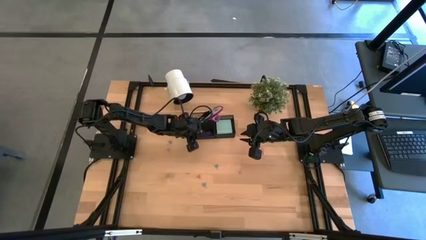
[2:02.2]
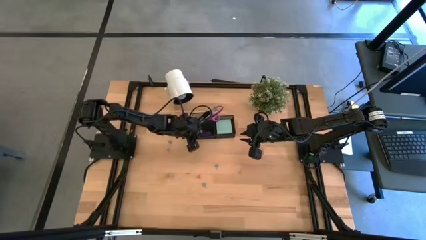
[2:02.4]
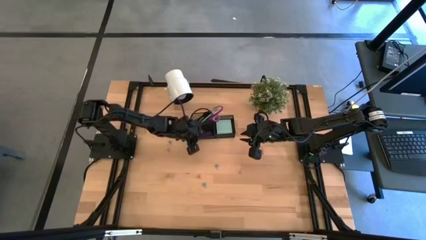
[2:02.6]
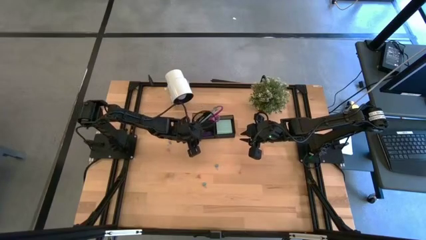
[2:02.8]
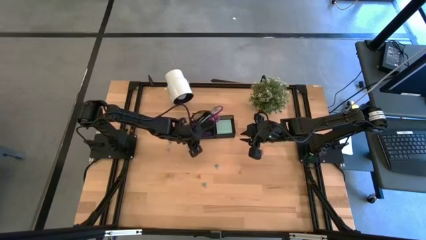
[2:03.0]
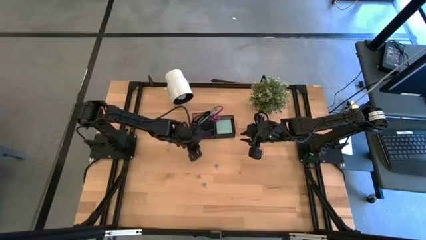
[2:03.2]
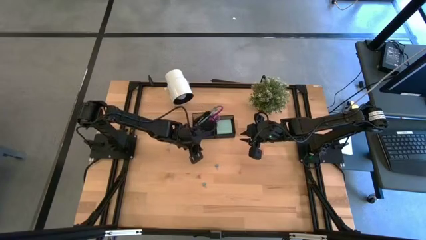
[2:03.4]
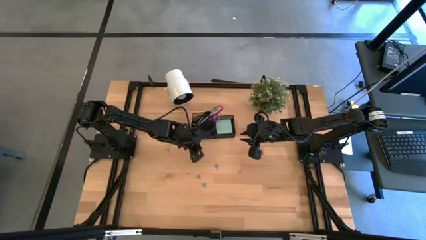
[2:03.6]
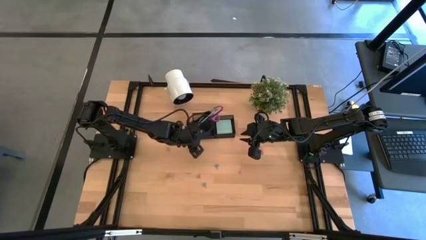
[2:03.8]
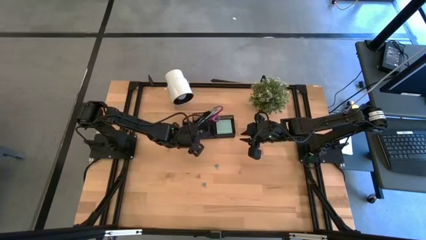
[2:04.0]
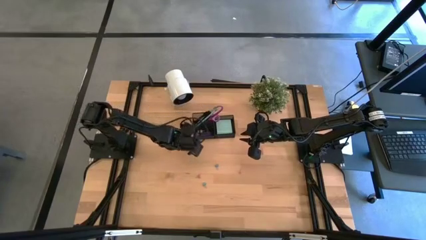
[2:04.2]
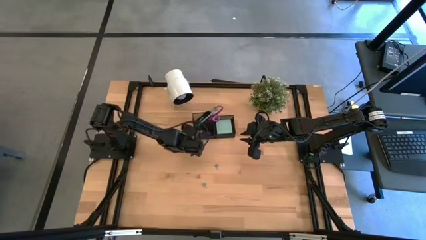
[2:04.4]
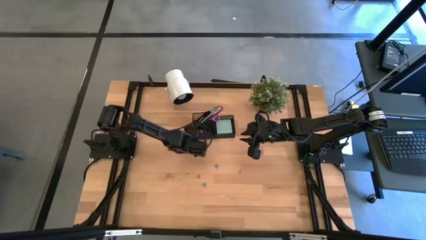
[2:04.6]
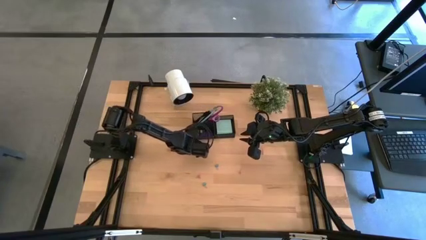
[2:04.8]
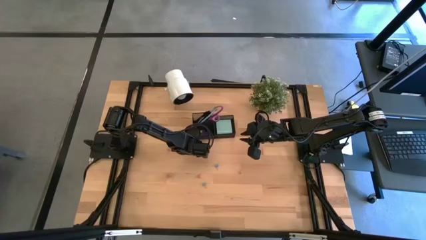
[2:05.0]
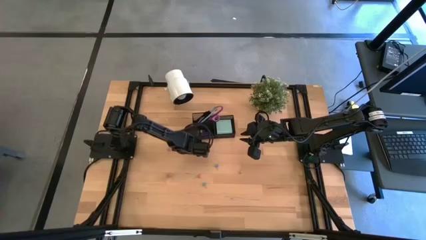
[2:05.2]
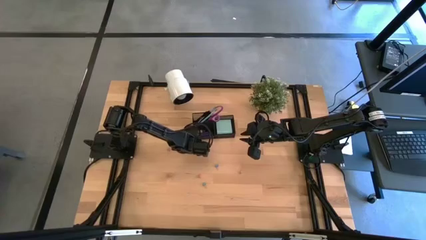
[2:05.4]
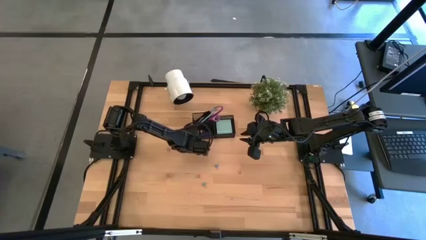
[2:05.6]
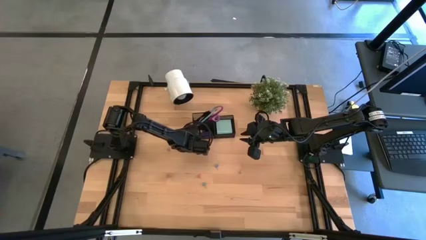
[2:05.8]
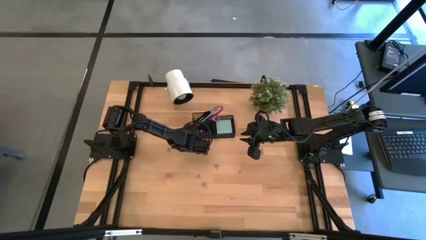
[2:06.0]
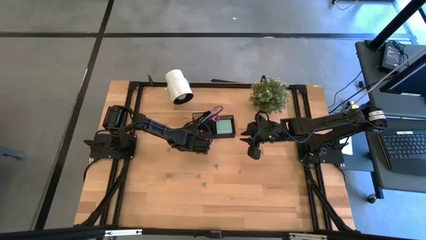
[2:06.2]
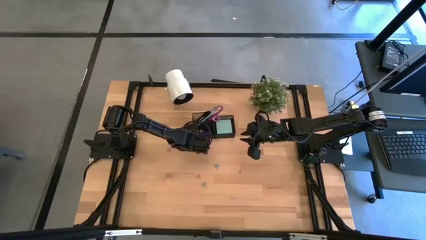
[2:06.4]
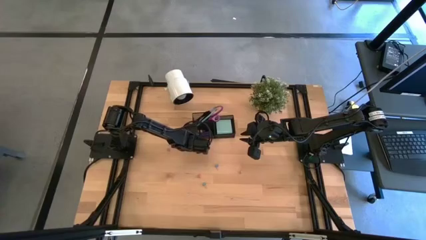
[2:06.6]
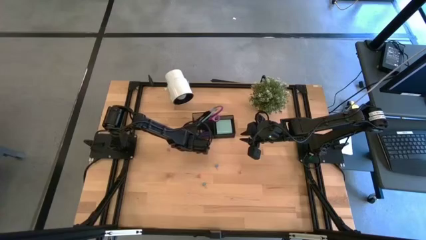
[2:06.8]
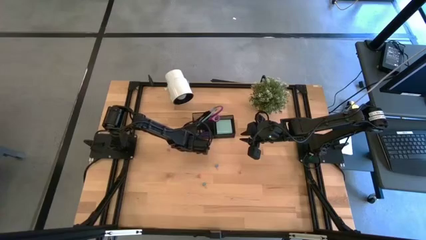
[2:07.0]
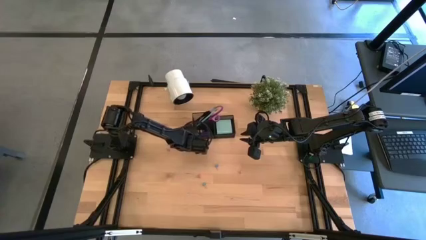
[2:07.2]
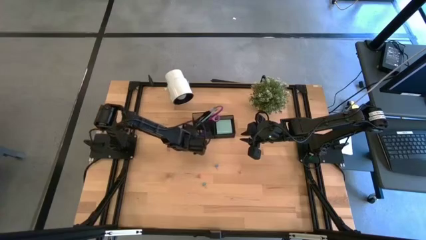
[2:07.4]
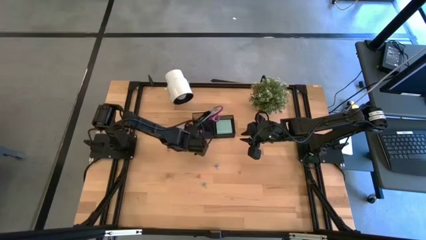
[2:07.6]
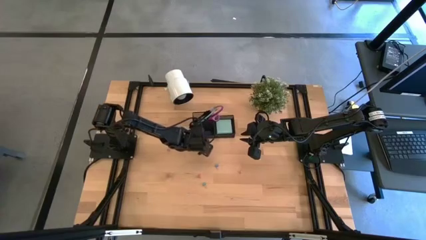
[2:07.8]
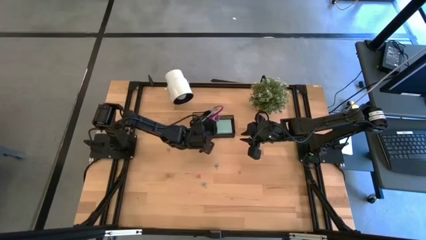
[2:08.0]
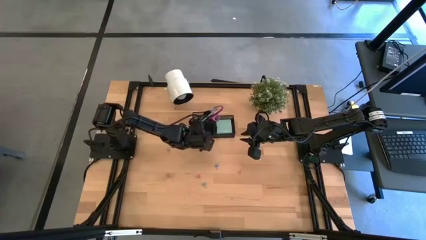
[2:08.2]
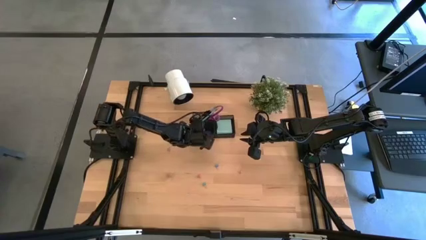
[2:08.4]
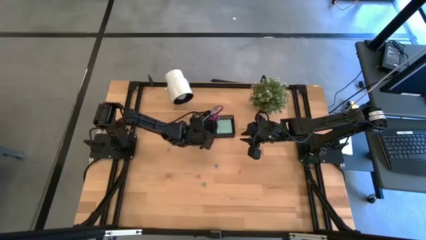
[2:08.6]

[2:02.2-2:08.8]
Task: Pick and place office supplies into organizer
Put the pink binder clip into the black desk organizer

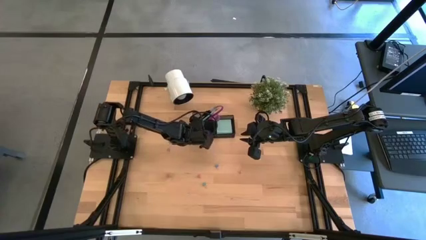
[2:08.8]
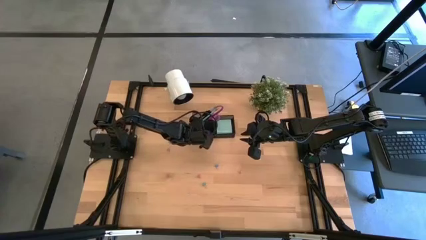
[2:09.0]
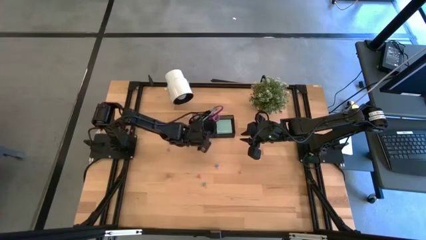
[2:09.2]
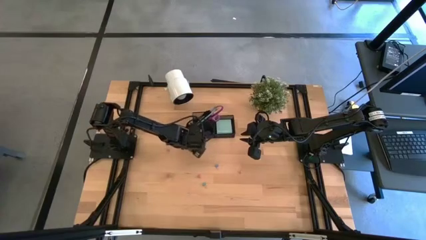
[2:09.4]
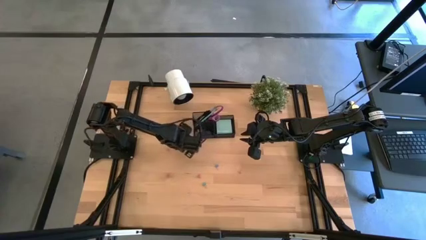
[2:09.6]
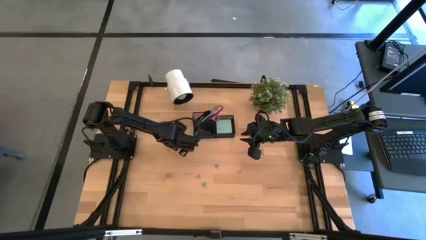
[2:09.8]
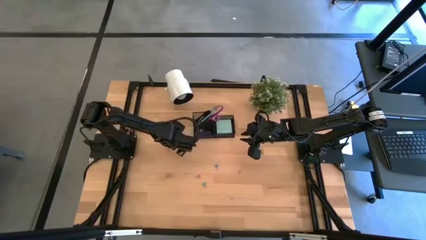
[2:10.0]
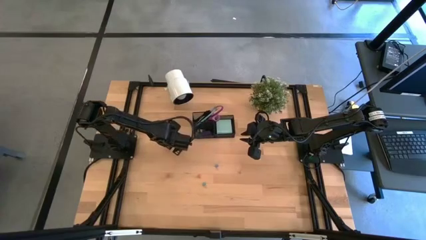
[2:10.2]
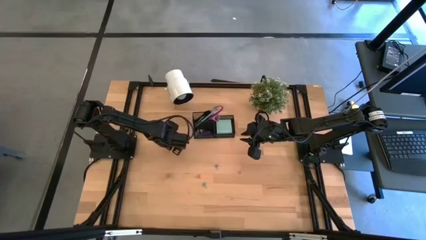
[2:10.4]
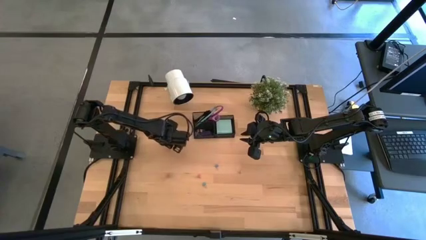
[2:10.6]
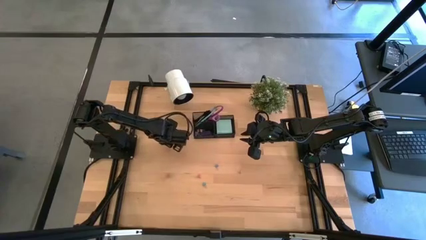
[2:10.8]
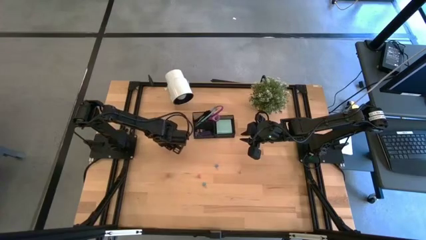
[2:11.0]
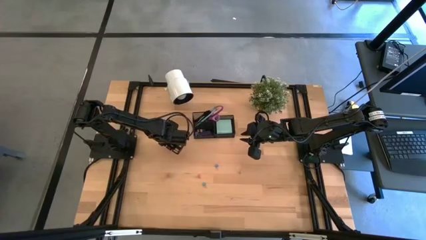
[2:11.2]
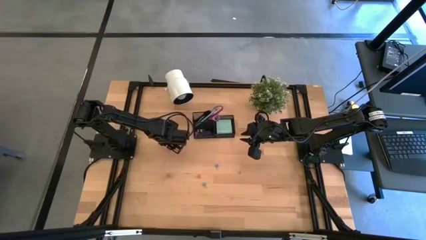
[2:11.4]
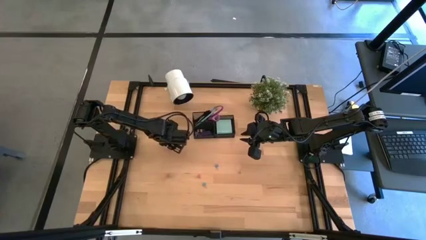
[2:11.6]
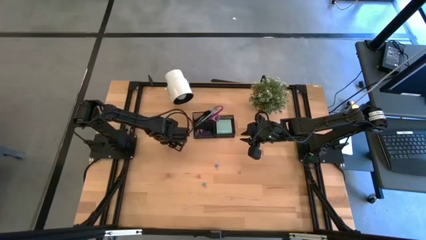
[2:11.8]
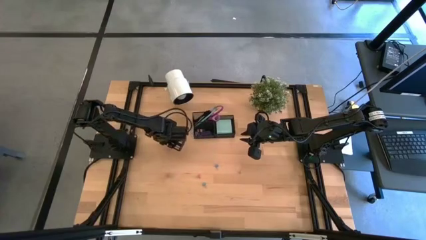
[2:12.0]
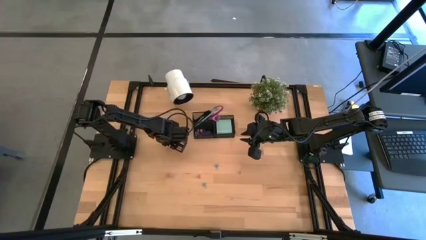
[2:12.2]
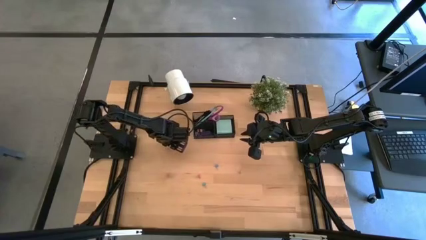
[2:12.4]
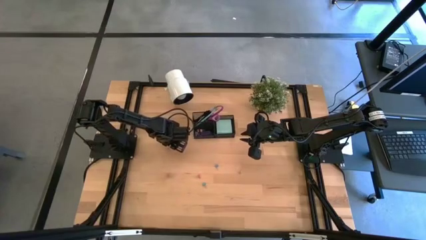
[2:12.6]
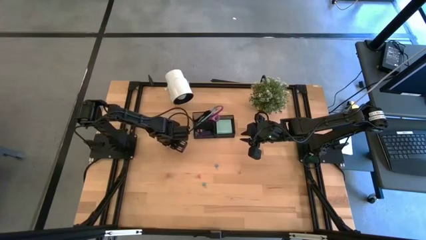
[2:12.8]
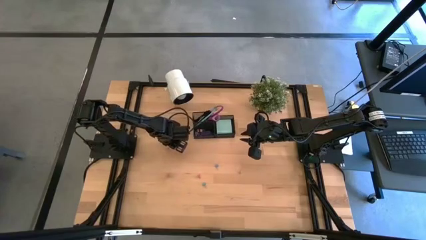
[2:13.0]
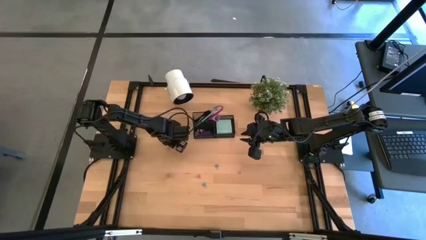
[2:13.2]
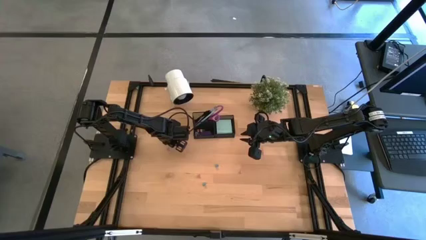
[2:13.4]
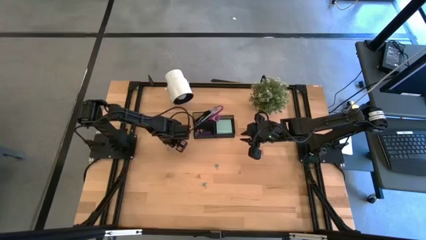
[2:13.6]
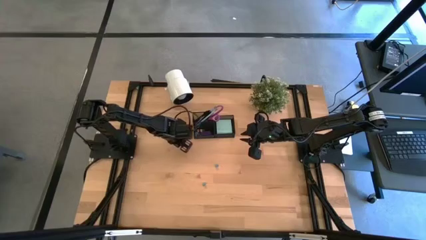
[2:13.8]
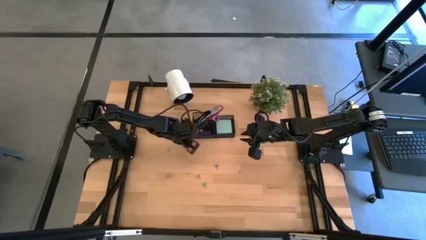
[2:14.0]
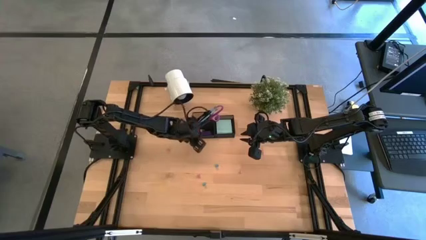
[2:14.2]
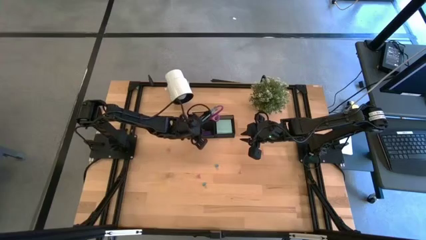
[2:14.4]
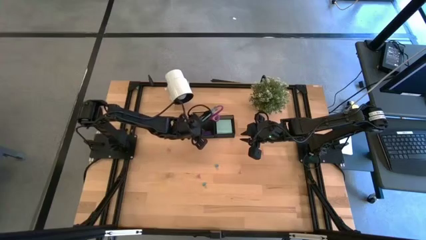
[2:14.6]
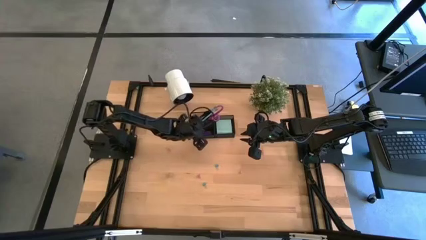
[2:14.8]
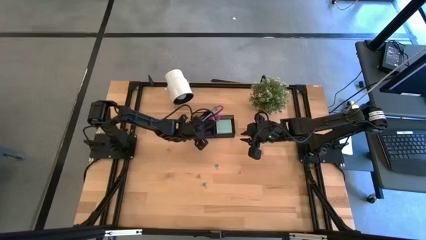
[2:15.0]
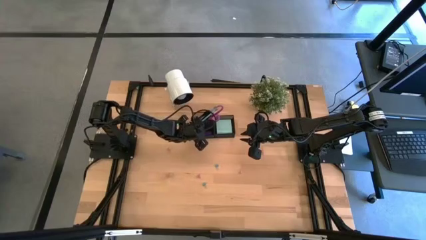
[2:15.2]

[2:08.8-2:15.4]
Put the blue binder clip into the black desk organizer

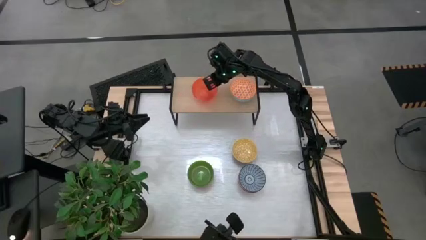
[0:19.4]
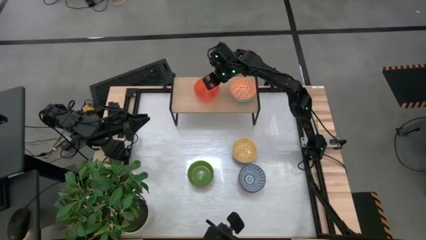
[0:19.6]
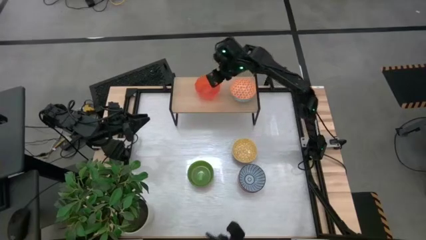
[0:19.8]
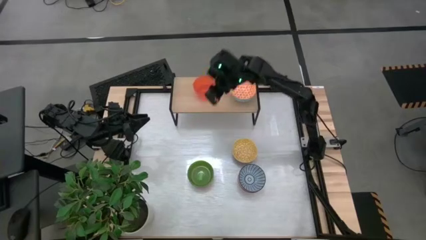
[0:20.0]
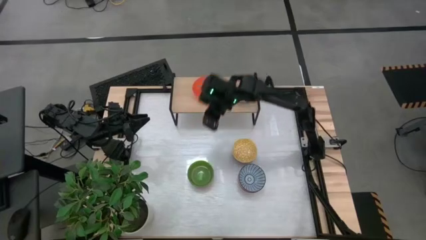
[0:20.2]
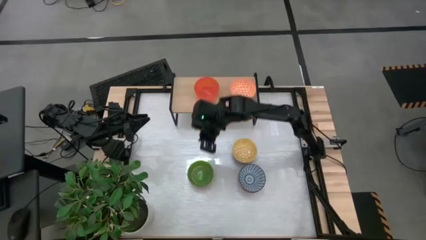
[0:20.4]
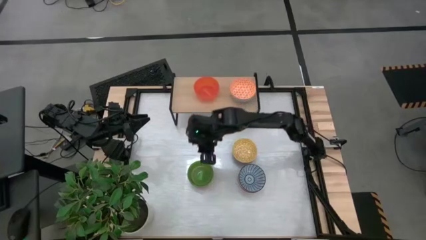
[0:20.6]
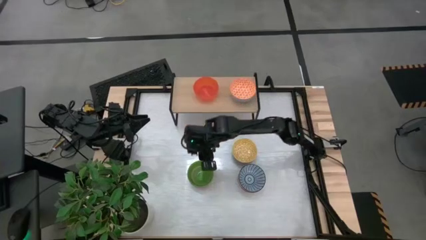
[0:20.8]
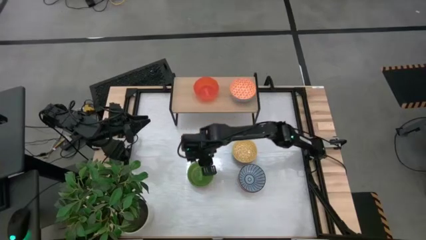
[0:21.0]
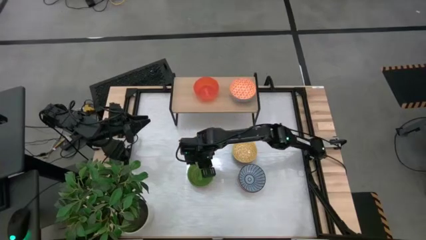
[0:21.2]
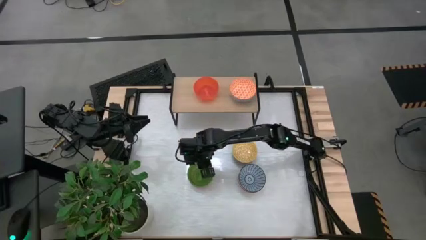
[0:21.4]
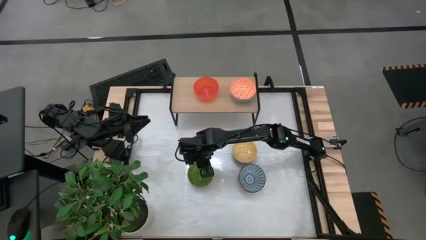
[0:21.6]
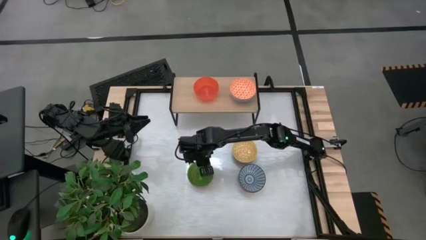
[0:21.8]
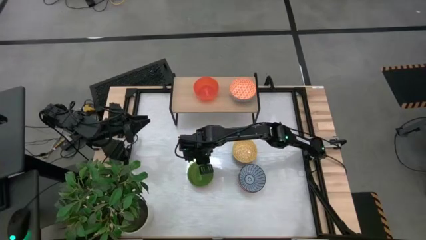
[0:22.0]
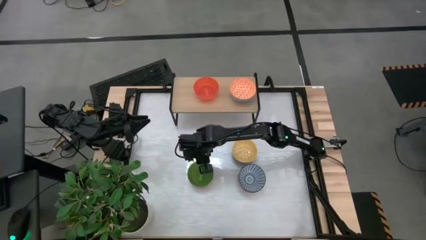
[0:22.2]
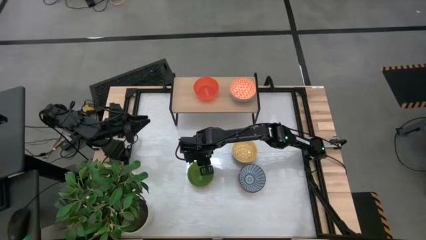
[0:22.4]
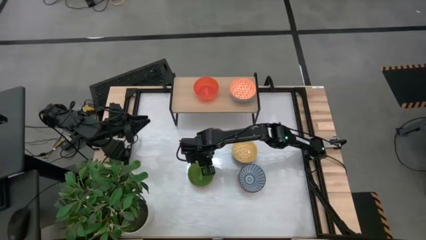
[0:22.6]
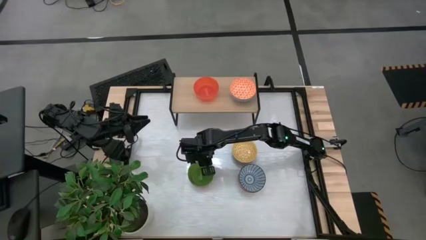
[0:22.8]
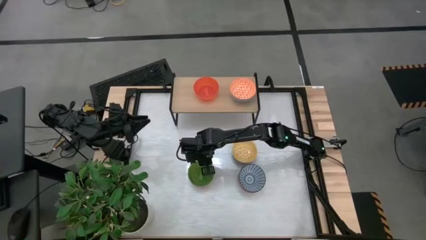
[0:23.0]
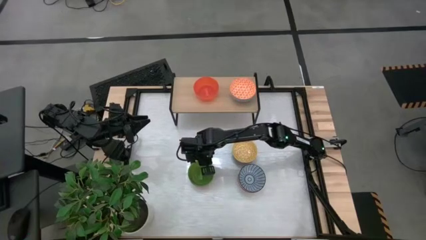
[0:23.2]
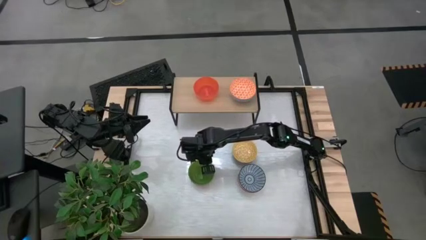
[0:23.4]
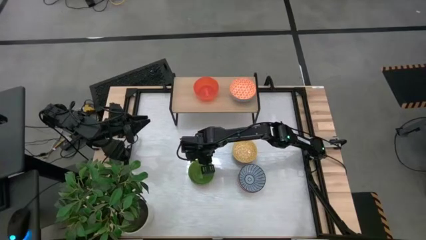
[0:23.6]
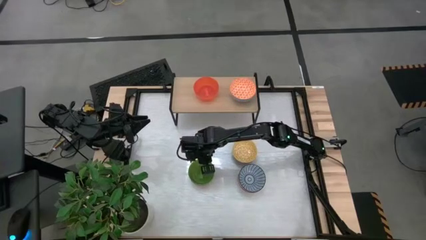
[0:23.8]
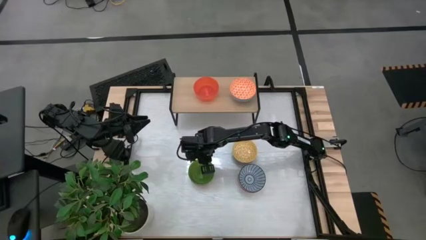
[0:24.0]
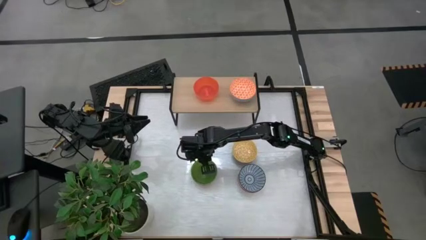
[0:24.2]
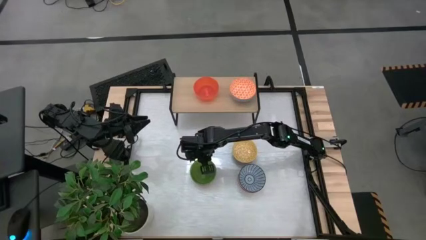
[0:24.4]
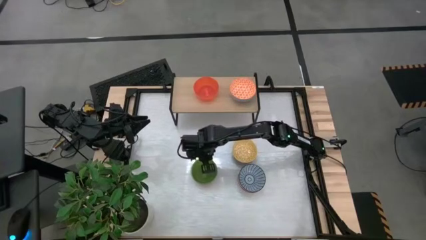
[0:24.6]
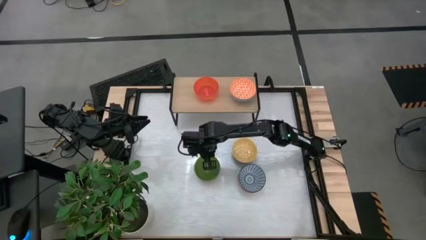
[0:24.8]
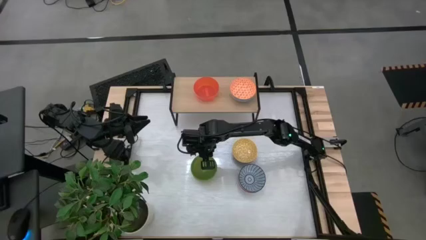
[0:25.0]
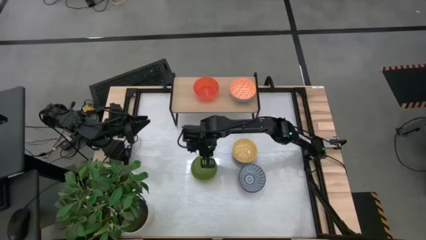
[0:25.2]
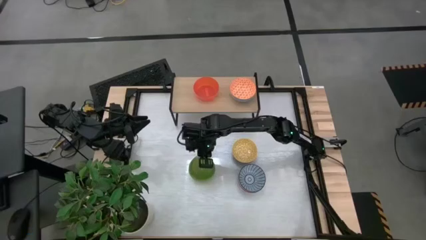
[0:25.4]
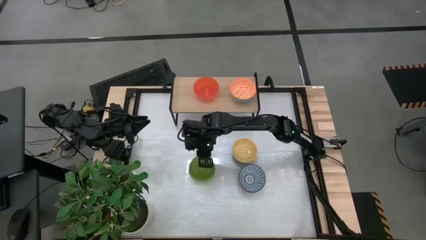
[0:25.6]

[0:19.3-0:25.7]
Task: Place and stack bowls onto a shelf
Stack the green bowl on top of the orange bowl on the shelf
